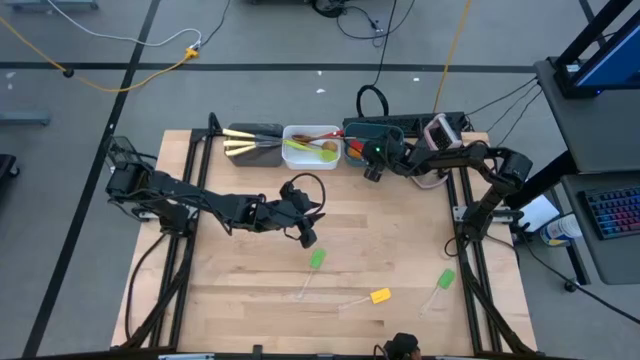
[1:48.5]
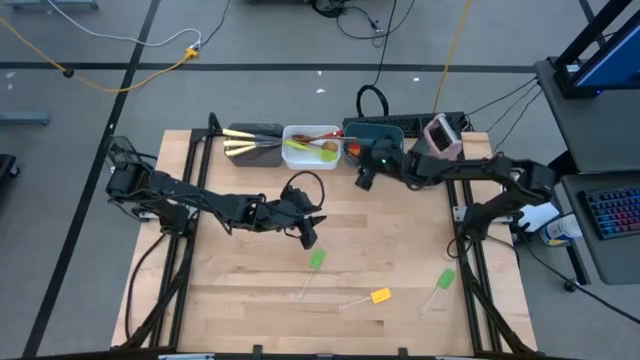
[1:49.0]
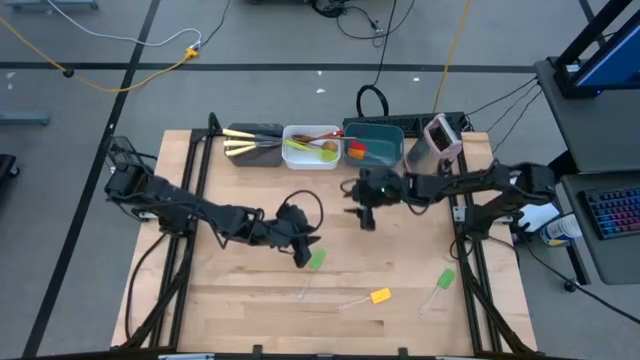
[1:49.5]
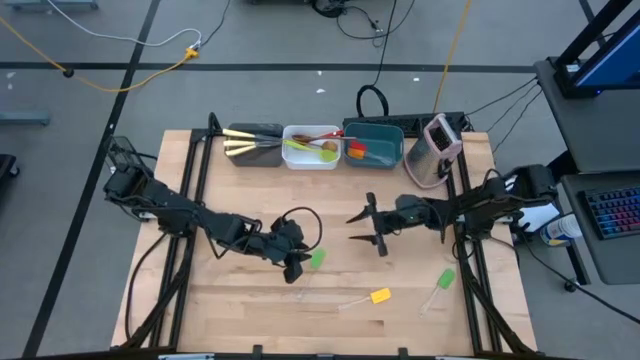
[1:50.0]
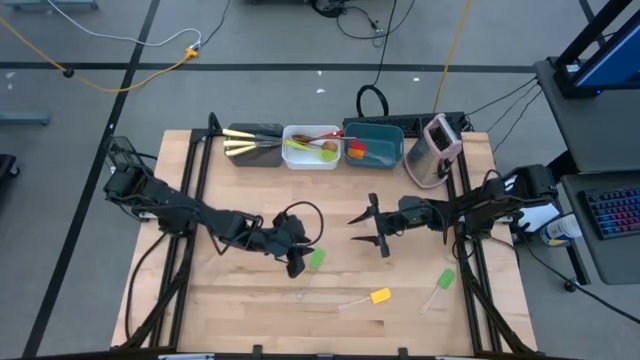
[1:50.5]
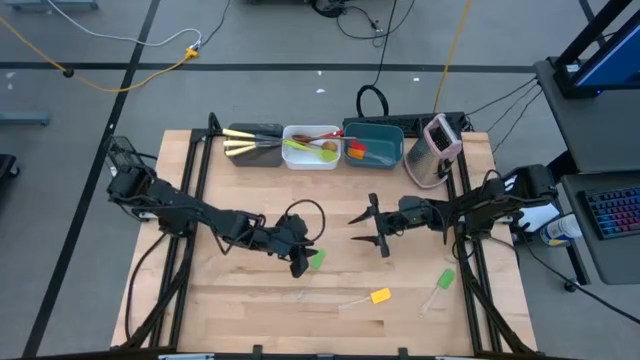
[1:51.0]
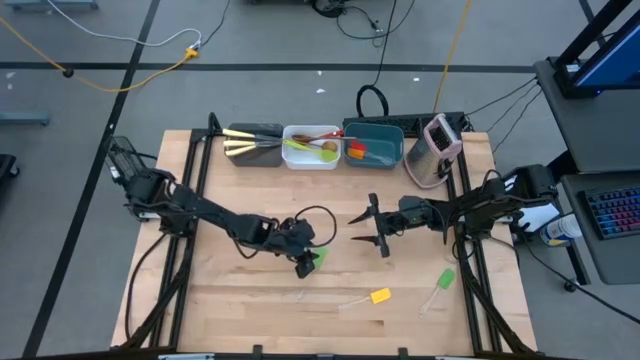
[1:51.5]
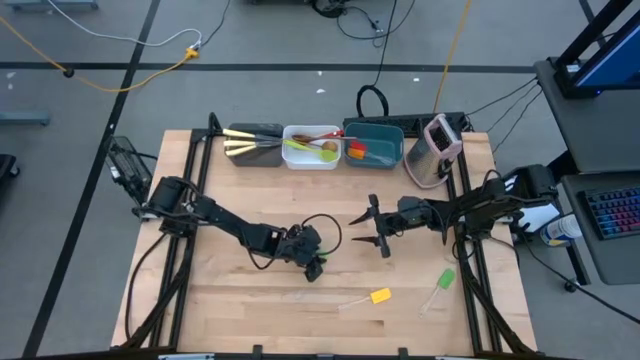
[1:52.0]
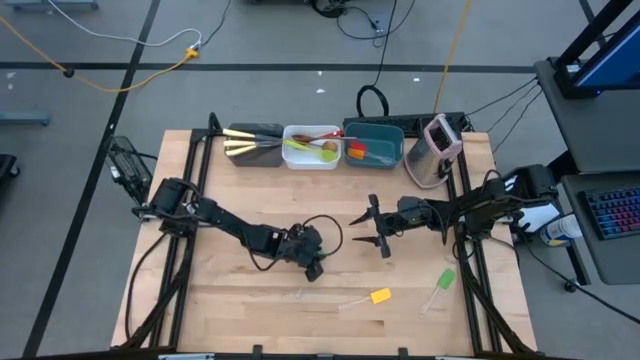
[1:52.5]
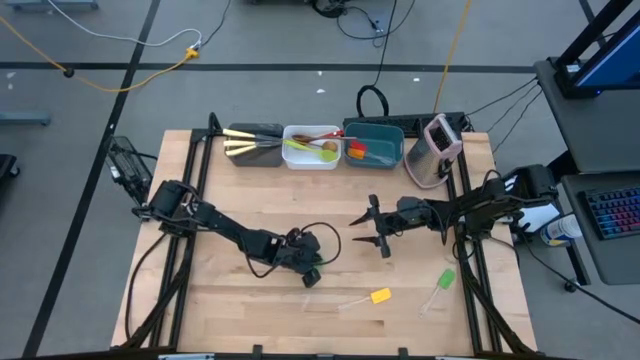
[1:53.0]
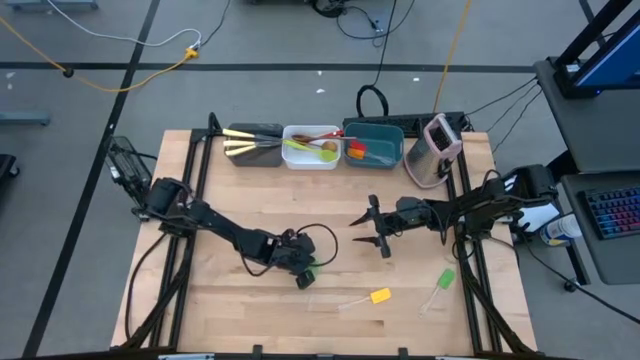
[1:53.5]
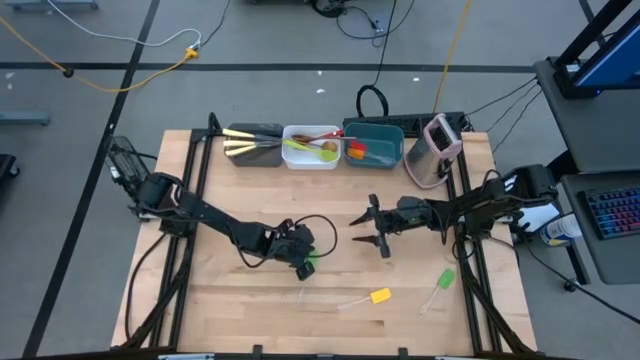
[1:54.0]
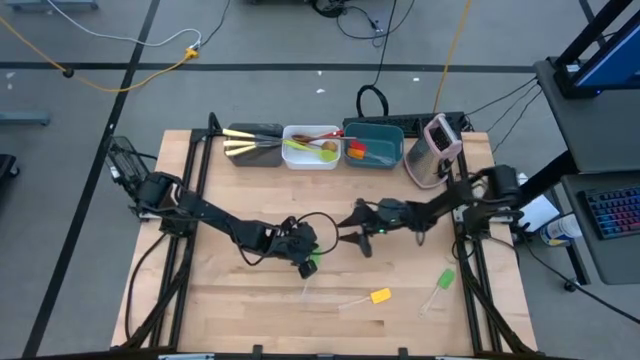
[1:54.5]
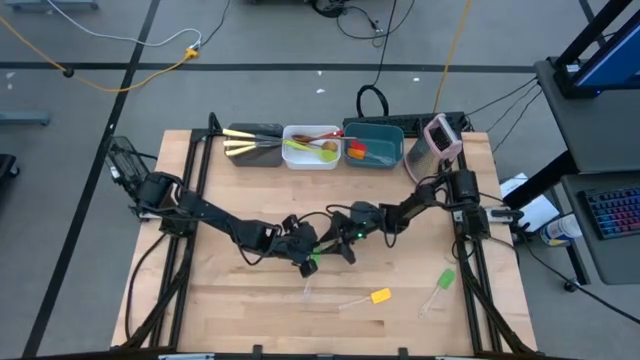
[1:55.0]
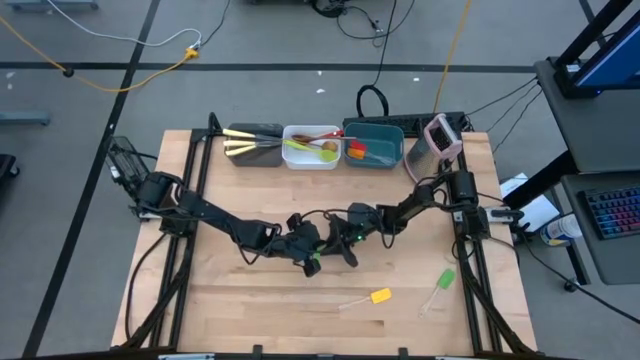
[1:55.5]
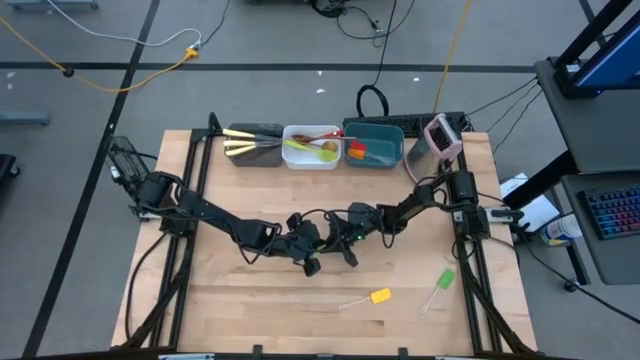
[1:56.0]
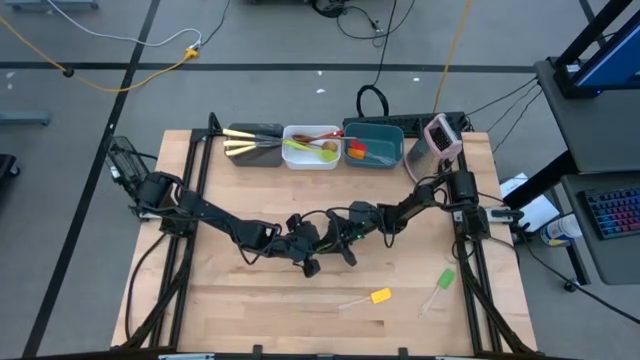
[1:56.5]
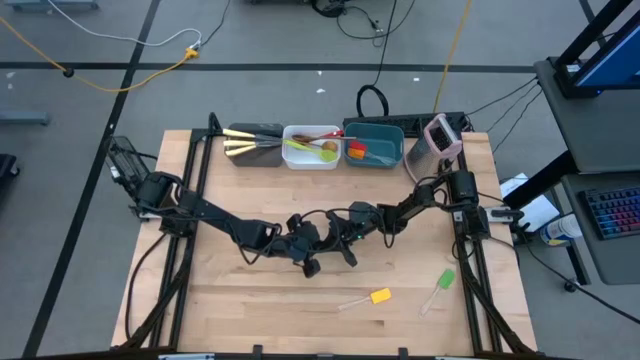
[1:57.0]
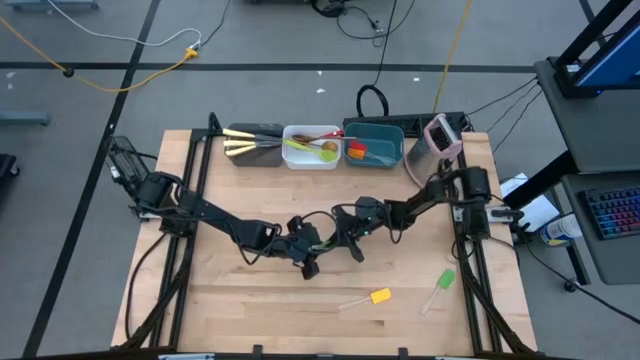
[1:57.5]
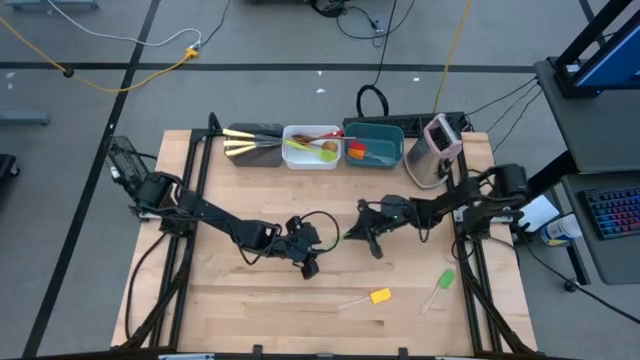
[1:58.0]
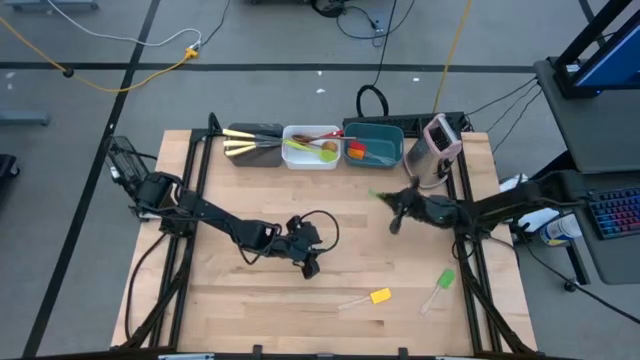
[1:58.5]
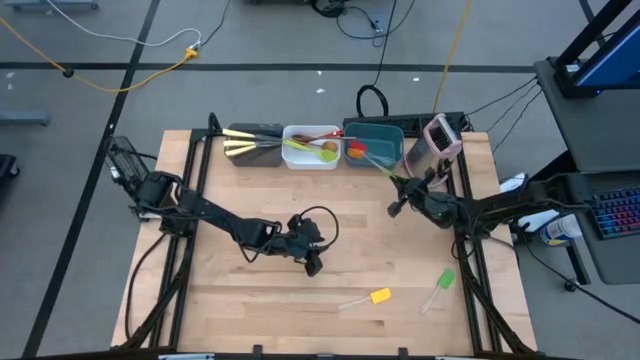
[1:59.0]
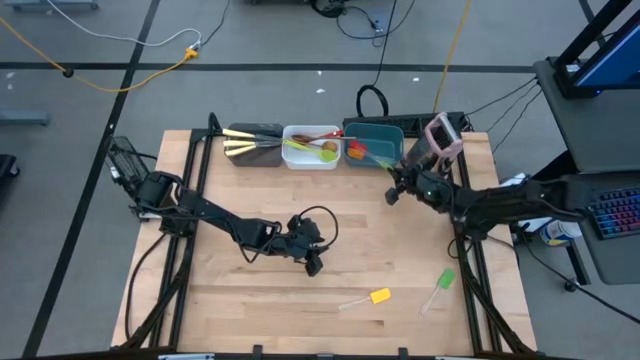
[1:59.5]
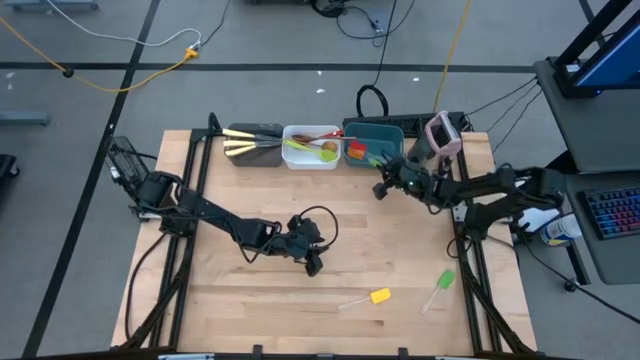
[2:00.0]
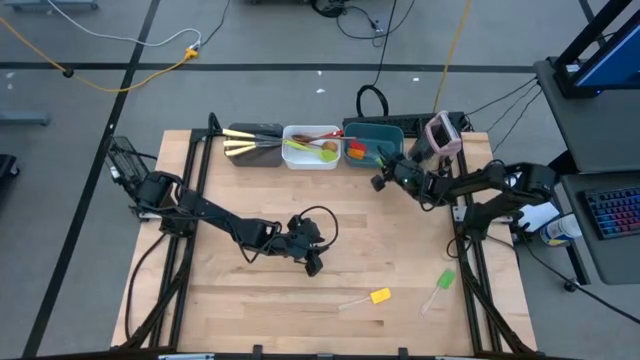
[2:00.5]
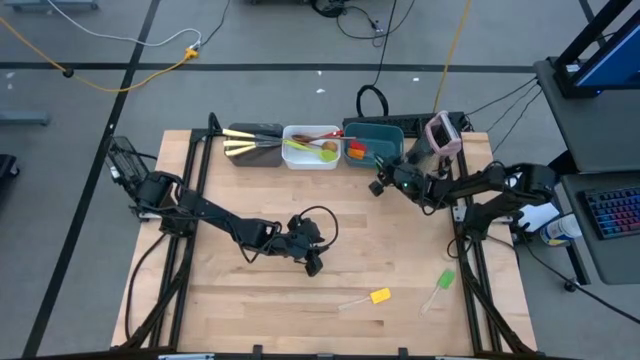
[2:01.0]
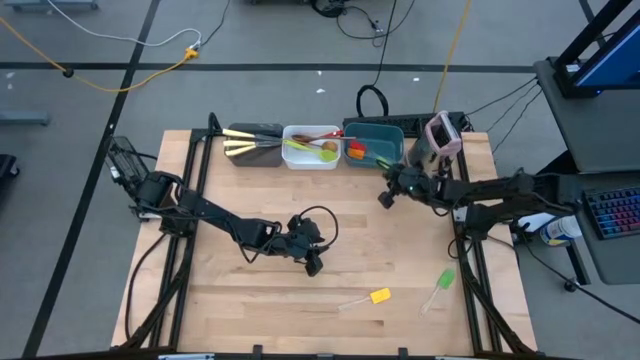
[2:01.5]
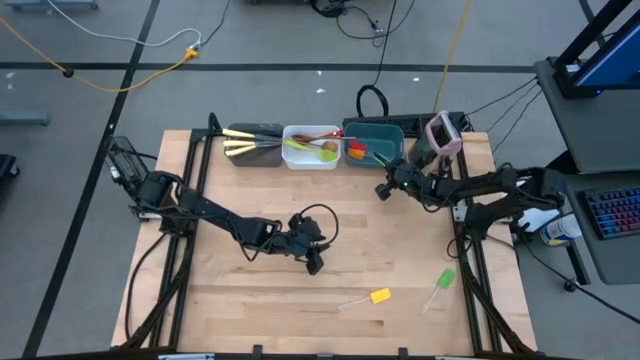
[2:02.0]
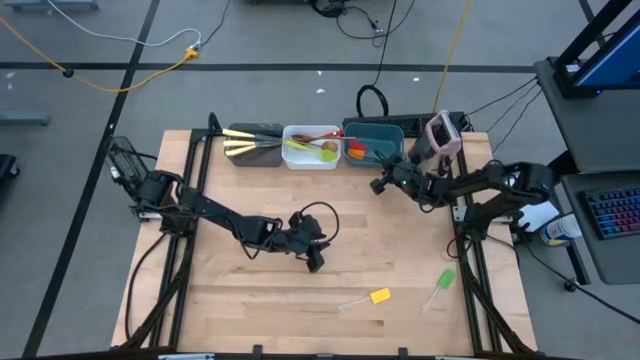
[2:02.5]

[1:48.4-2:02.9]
Task: Pick & Place Kitchen Items
Put the right green spatula into the blue bin

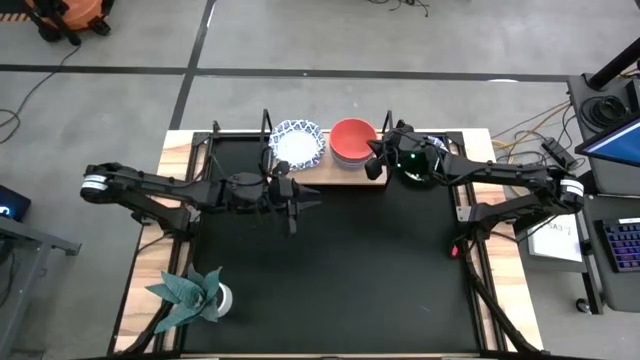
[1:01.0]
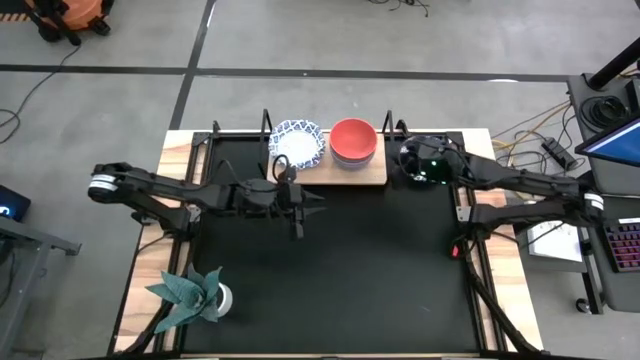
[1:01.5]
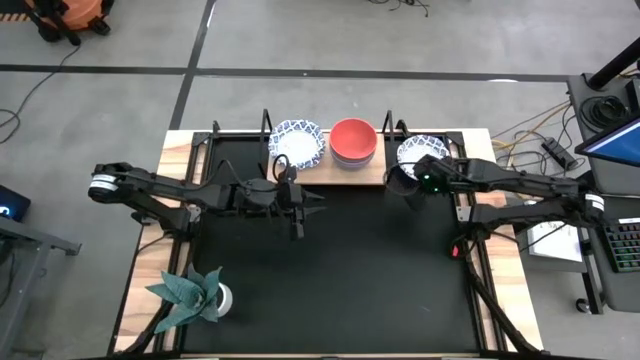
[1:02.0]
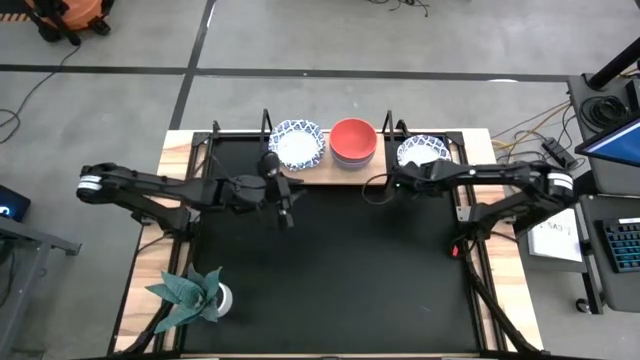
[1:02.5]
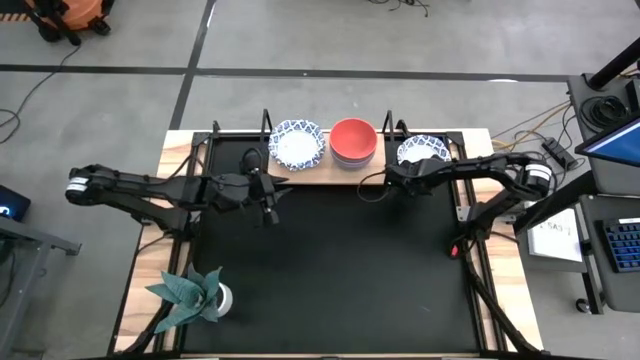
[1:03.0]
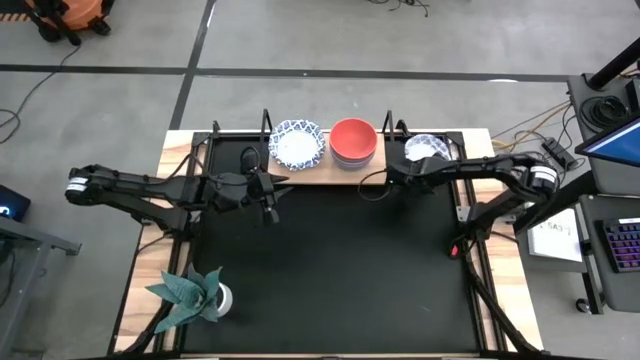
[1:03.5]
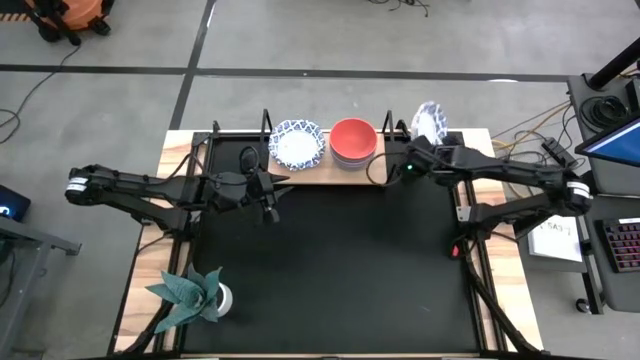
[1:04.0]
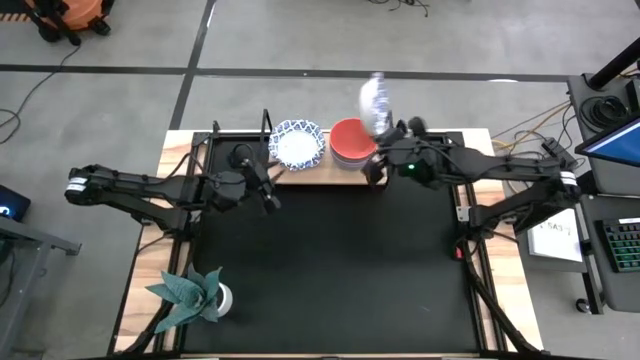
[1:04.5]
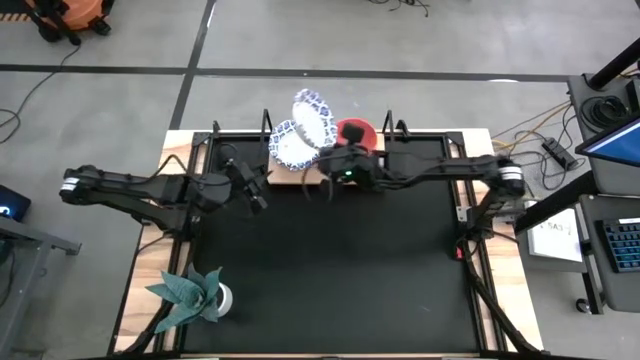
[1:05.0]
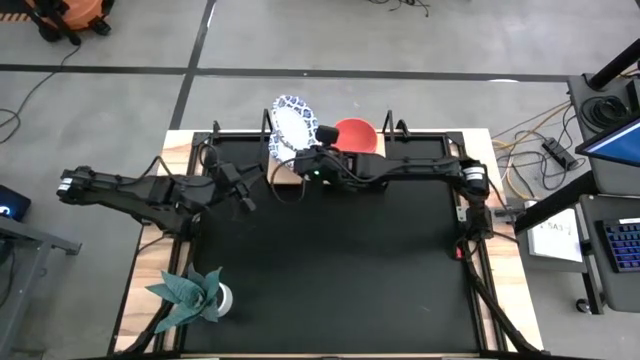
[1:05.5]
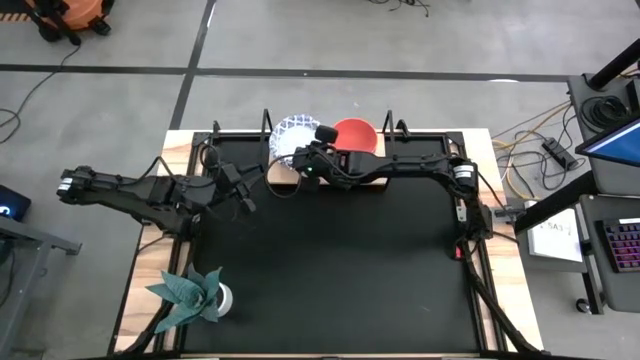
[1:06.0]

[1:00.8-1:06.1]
Task: Place and stack bowls onto a shelf
Stack the white bowl on top of the other white bowls on the shelf
